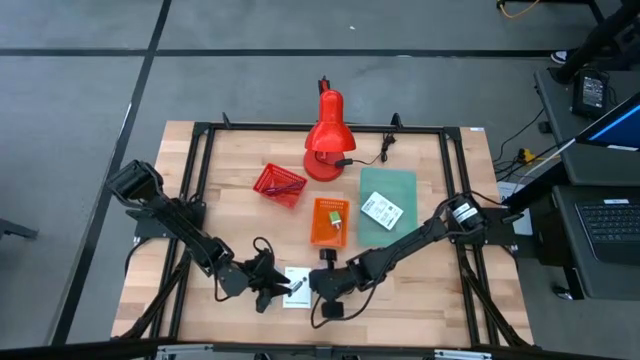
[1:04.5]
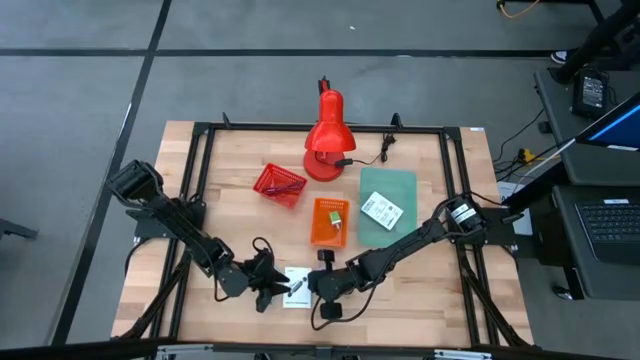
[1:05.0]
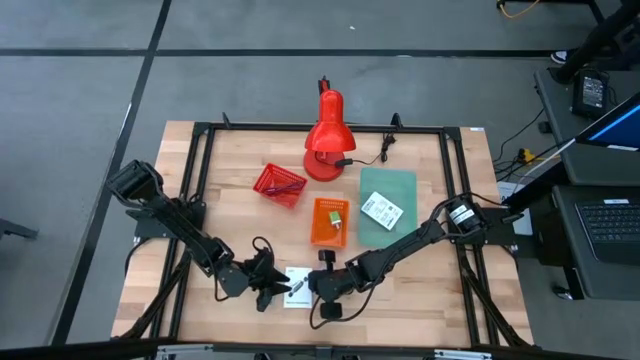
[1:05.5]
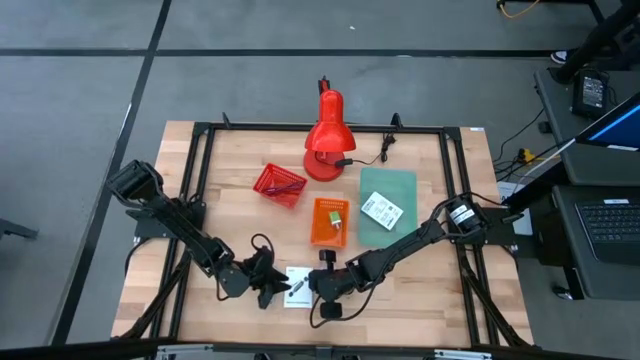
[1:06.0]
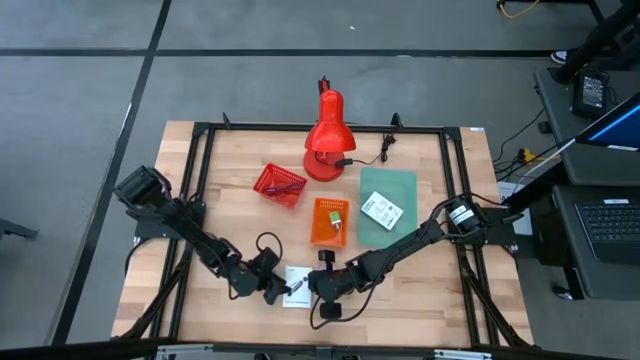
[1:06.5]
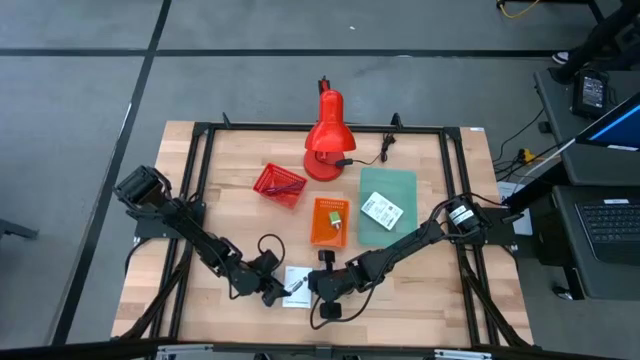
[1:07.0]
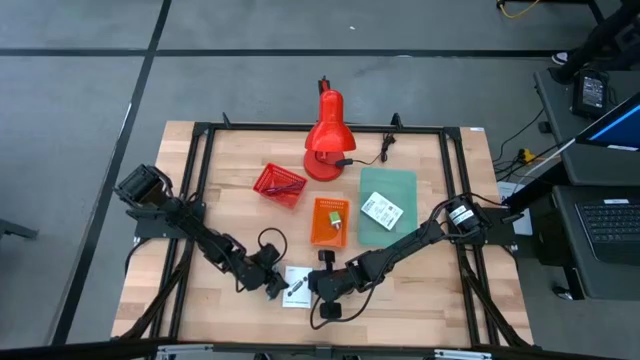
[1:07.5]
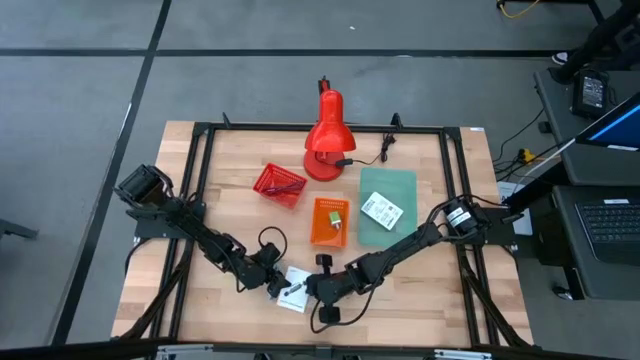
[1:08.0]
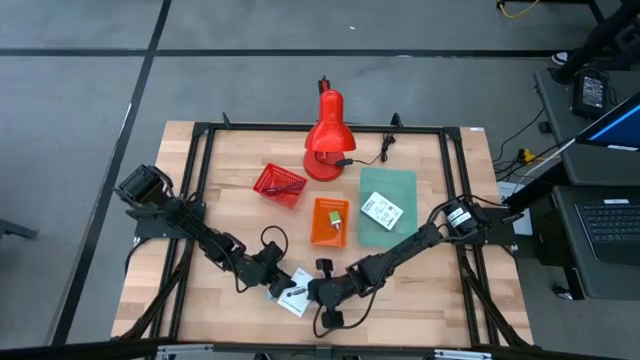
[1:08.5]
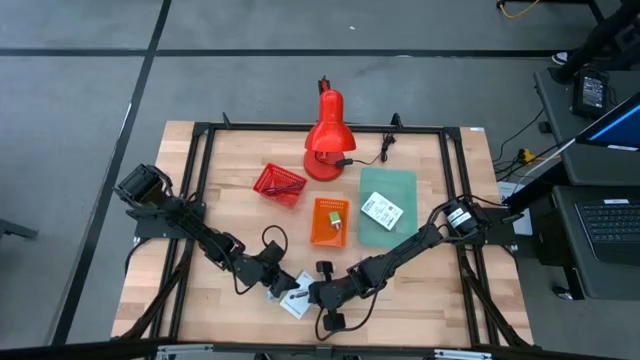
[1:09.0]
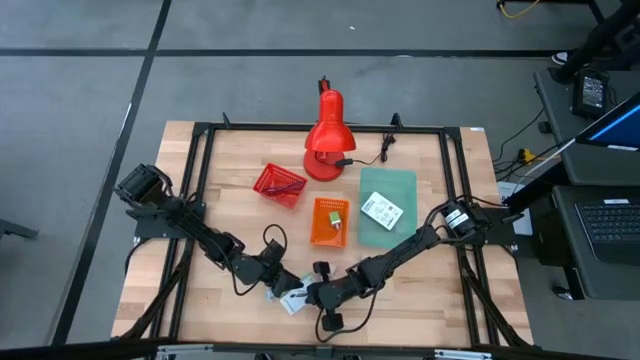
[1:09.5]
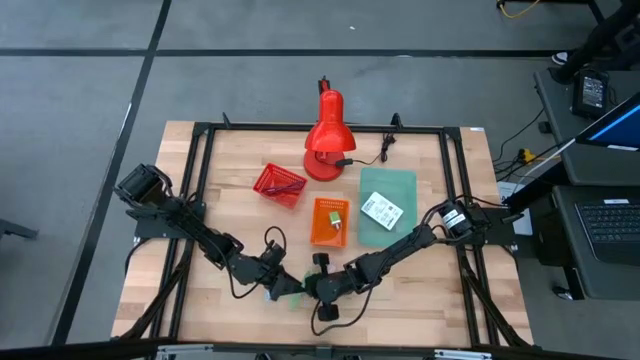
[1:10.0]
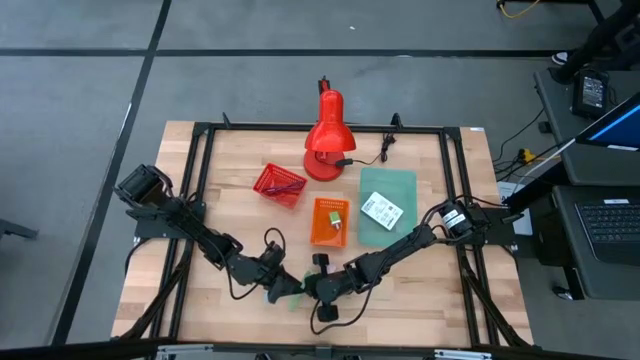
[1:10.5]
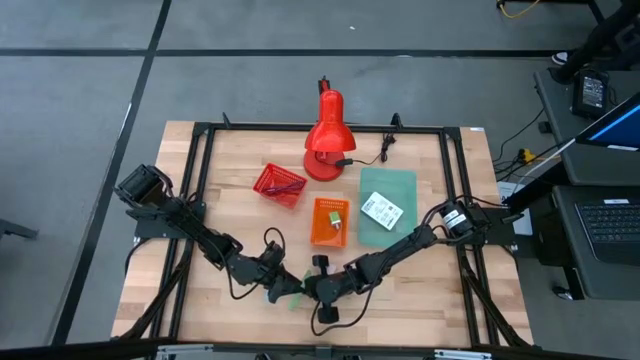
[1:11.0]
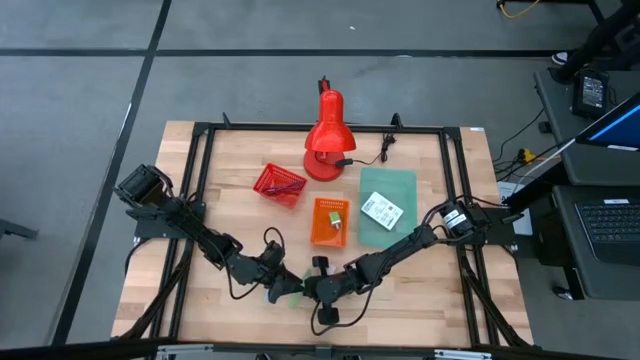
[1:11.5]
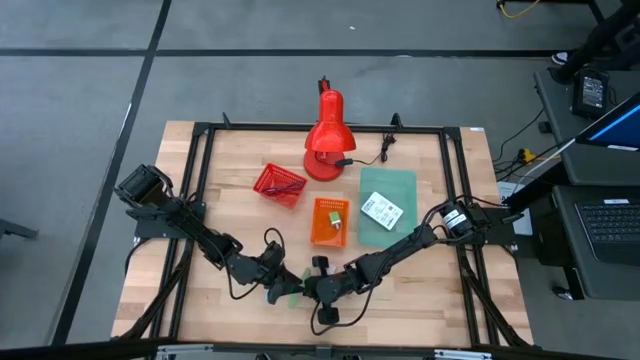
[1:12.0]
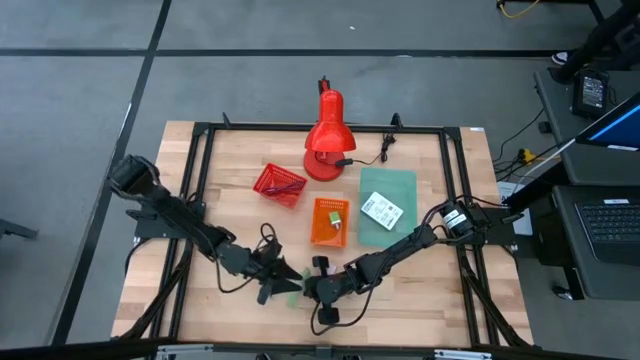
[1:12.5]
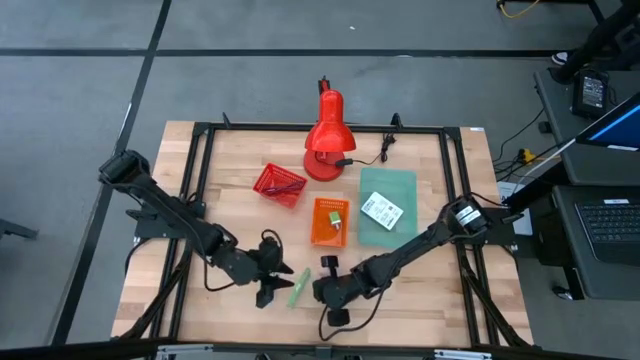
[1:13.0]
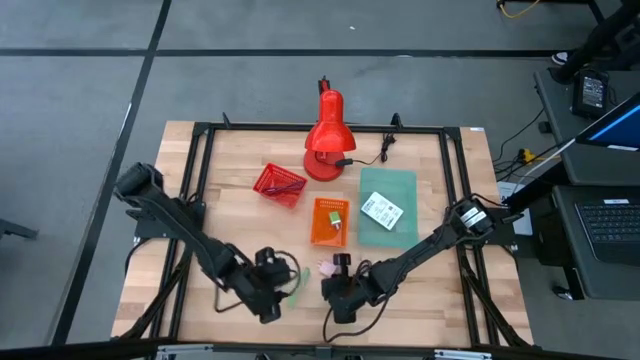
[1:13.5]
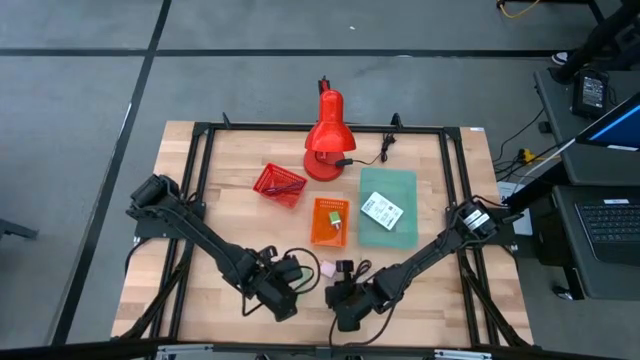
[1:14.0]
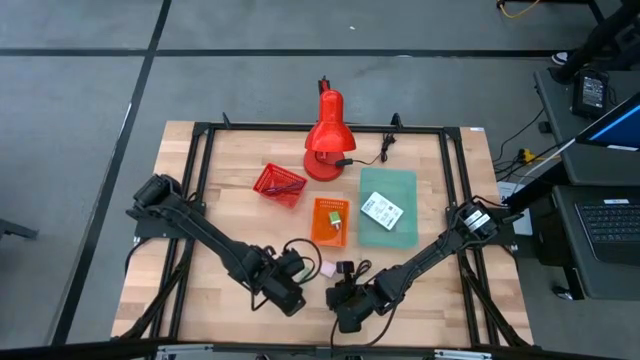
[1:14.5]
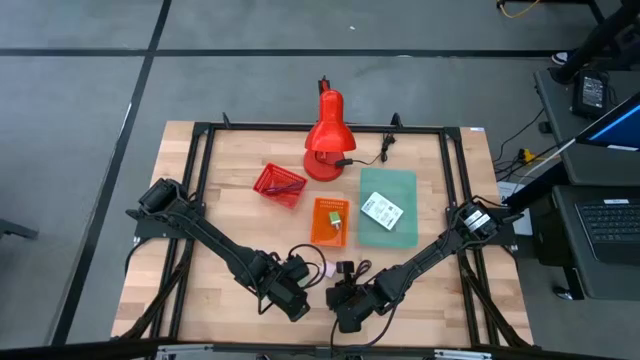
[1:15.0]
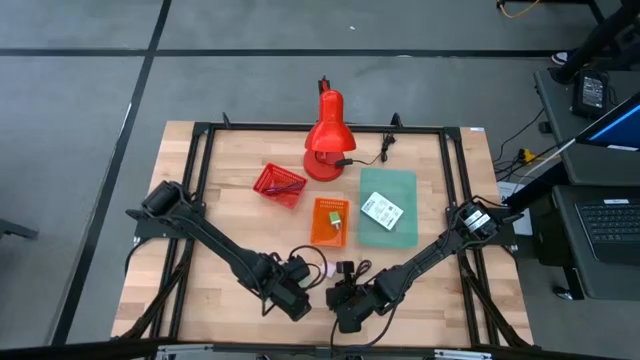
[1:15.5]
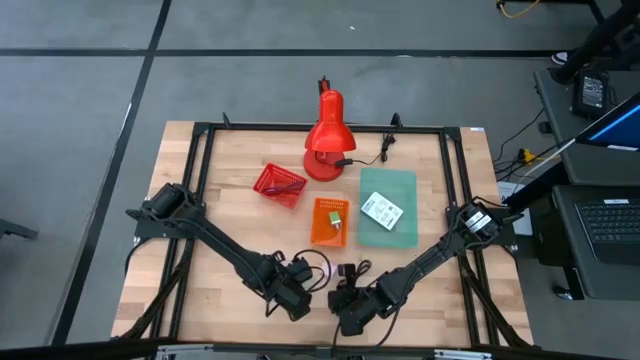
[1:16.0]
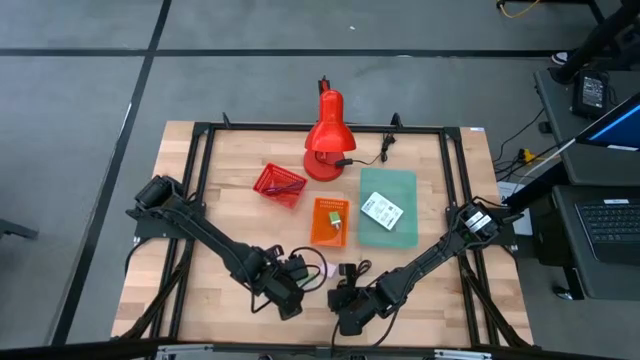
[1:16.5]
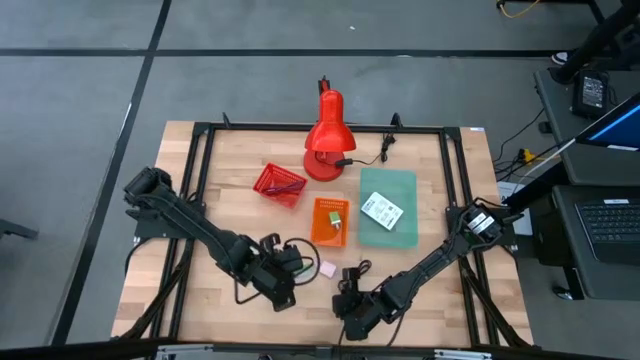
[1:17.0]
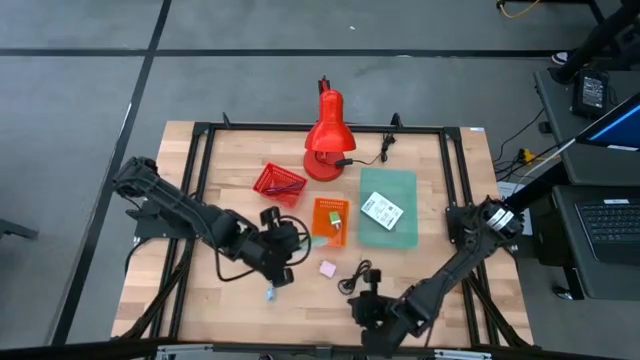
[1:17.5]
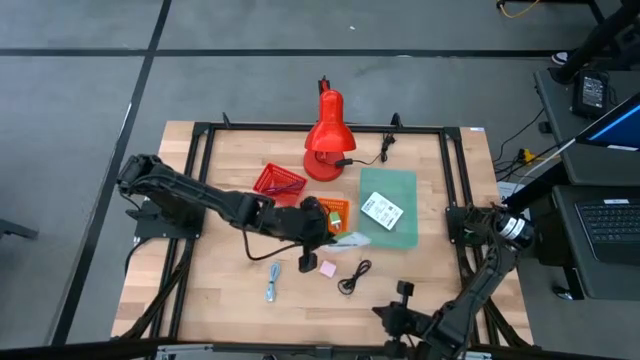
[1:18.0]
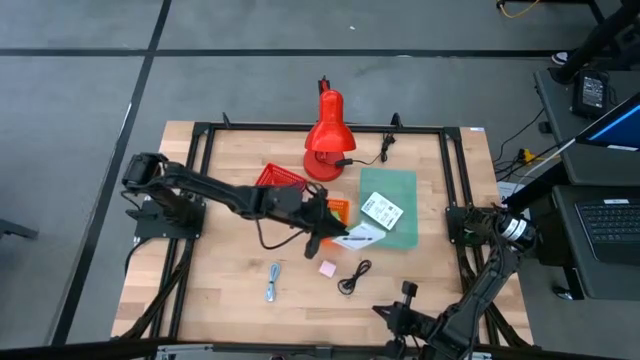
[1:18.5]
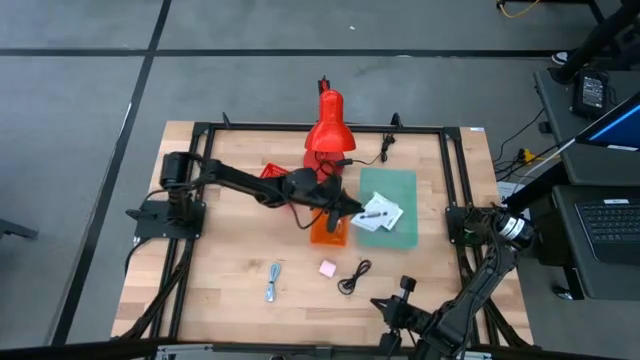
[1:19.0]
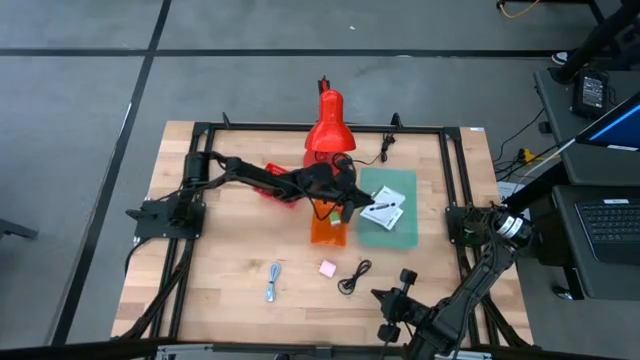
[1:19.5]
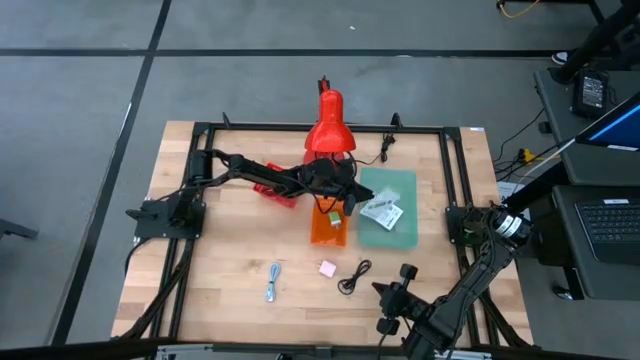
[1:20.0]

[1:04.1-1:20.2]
Task: Pick and place items into bin
Put the white card reader box into the light blue bin

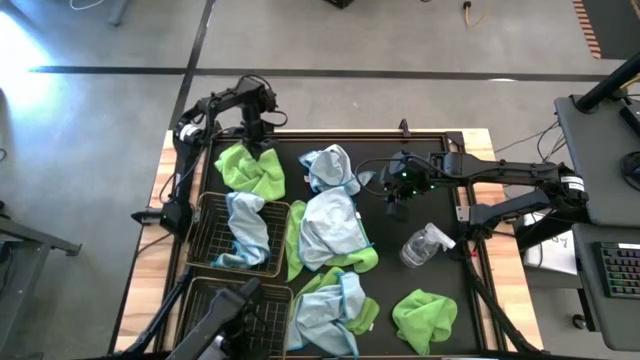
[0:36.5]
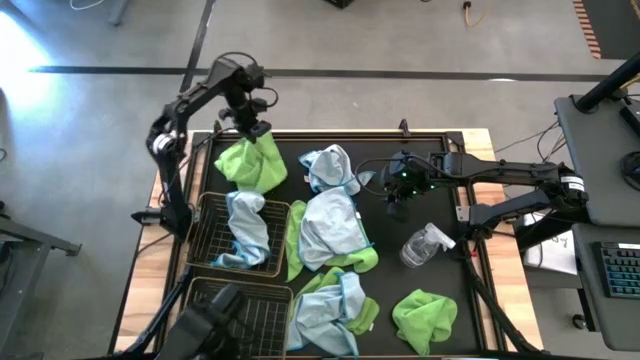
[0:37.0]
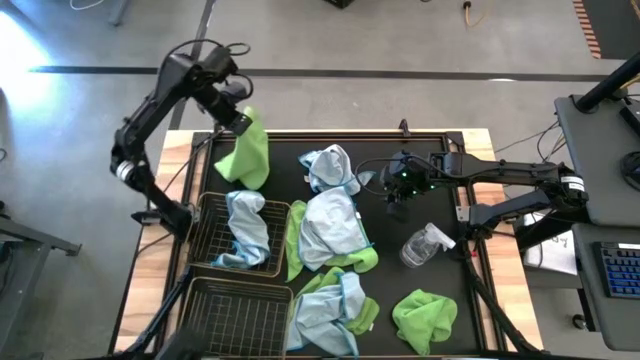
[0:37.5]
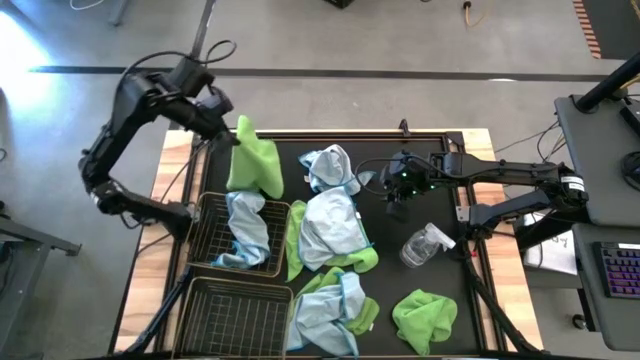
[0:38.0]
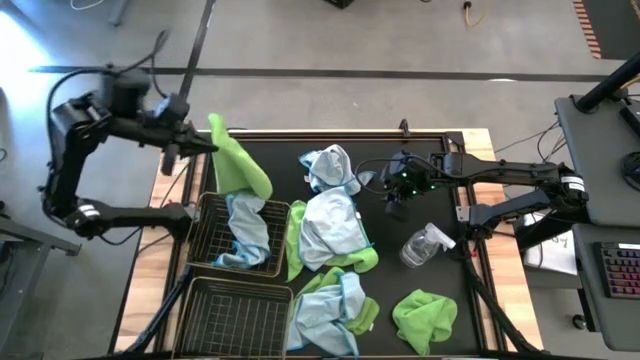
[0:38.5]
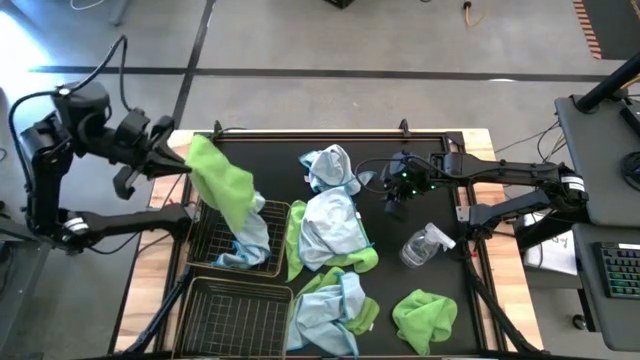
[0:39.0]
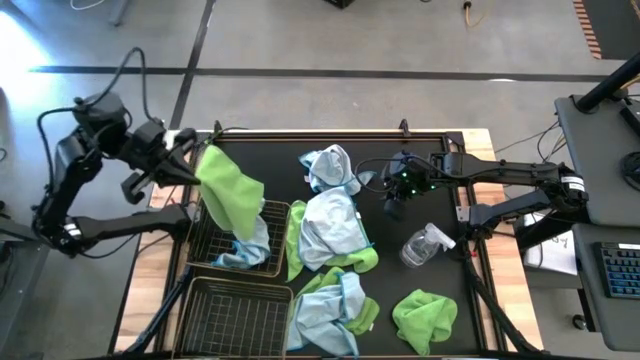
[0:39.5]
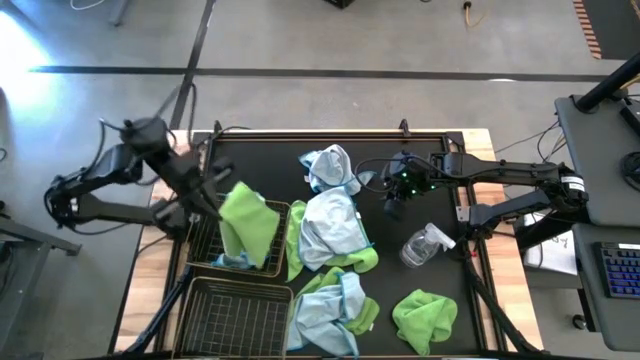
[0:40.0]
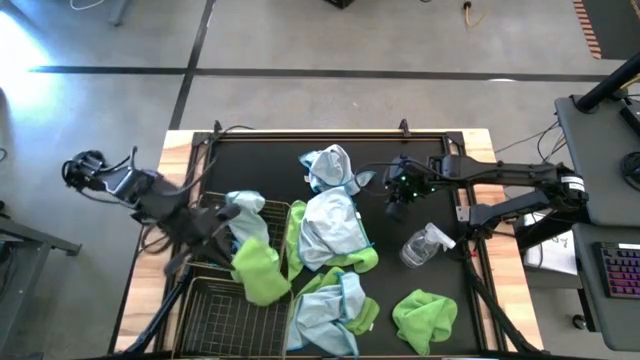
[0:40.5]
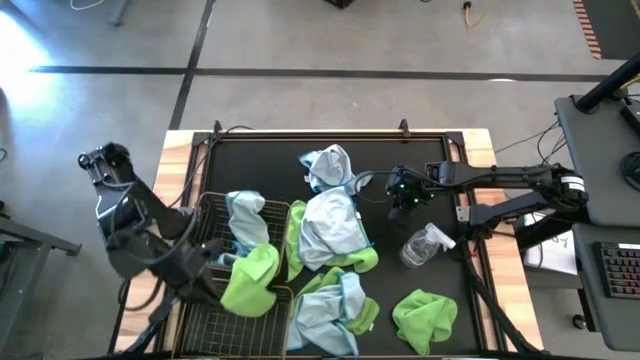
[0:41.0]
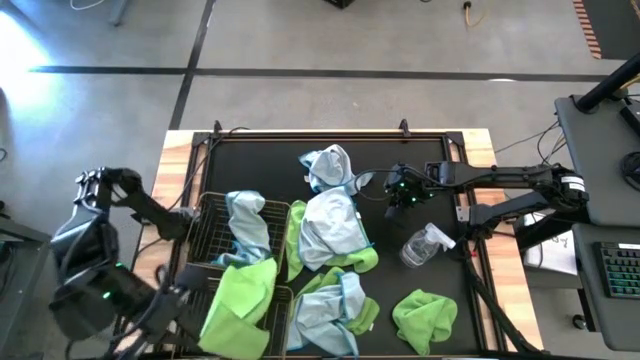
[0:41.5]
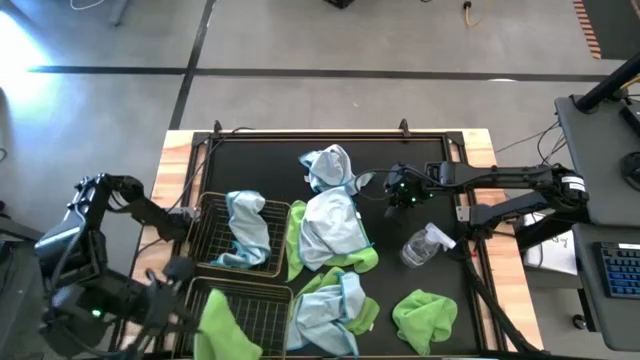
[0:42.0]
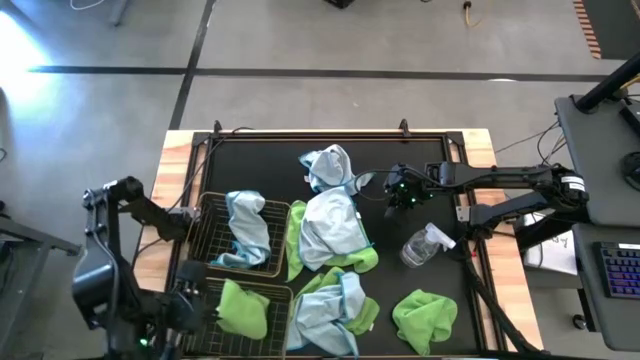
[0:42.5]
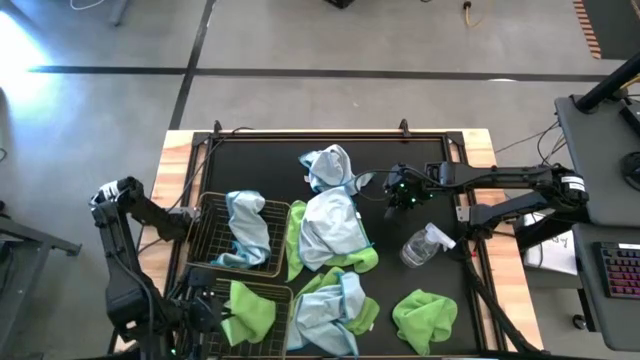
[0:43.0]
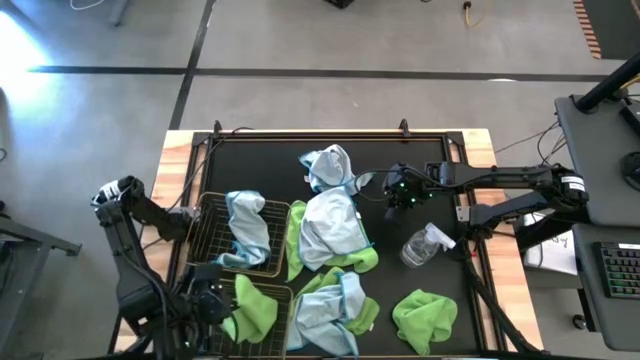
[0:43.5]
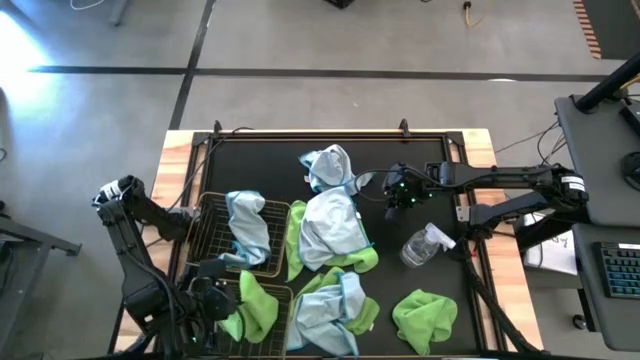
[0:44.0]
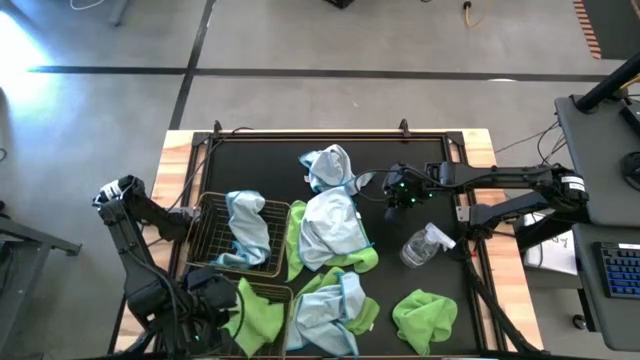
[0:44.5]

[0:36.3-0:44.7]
Task: Sort microfiber towel by color & place in baskets
Put the top left green towel into the bottom wire basket
